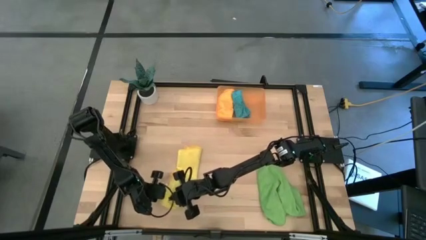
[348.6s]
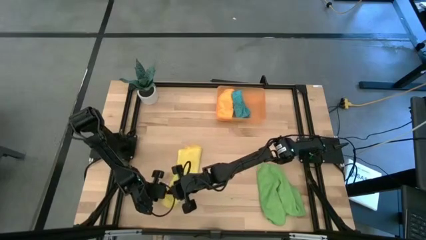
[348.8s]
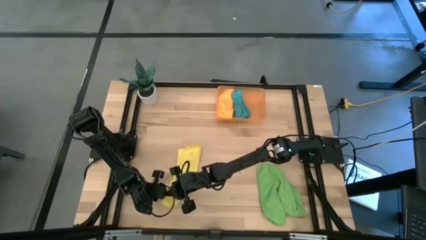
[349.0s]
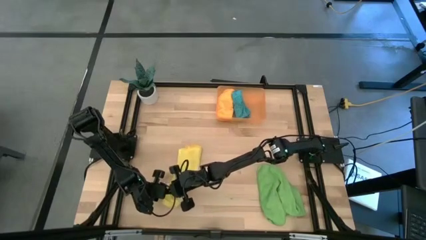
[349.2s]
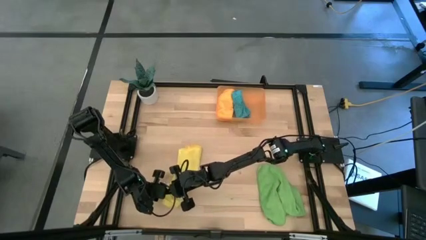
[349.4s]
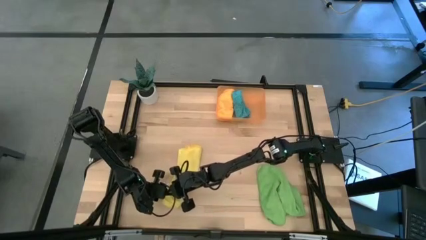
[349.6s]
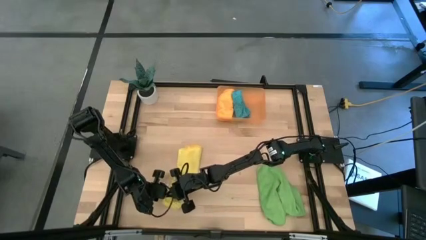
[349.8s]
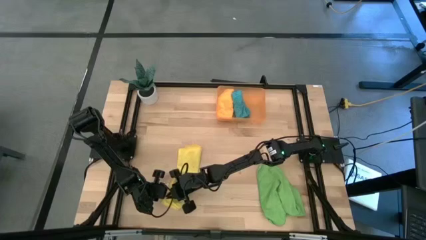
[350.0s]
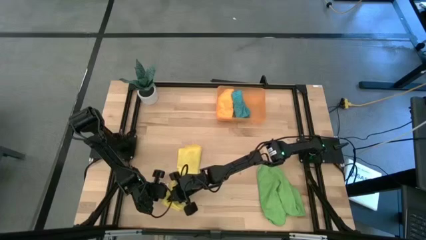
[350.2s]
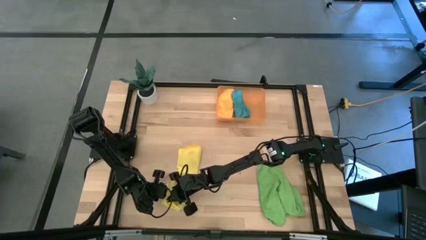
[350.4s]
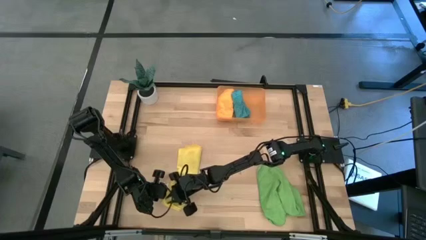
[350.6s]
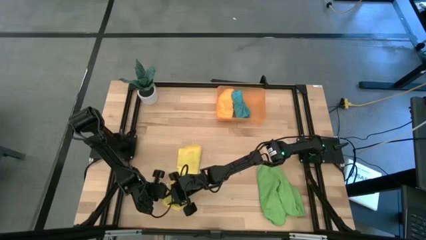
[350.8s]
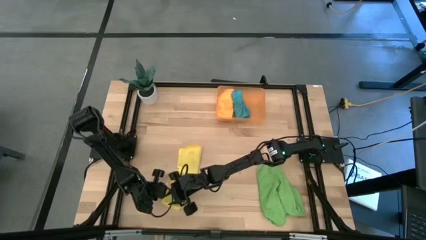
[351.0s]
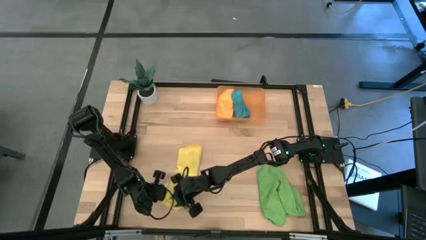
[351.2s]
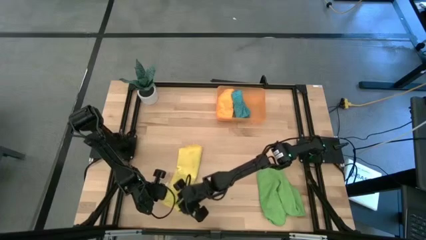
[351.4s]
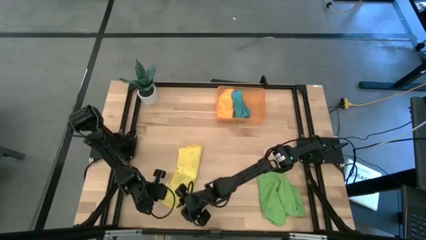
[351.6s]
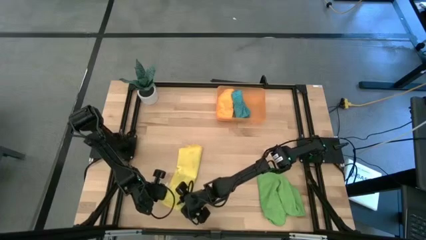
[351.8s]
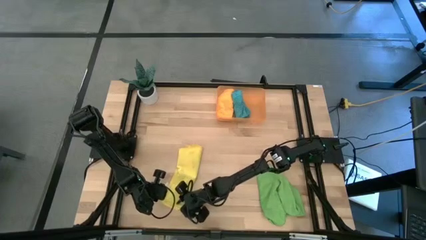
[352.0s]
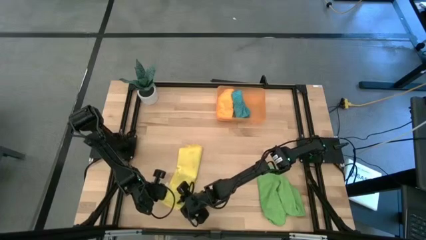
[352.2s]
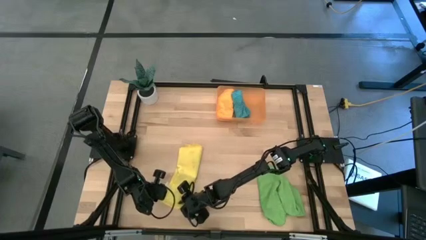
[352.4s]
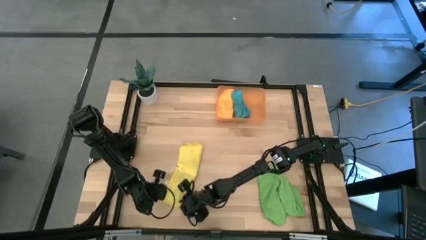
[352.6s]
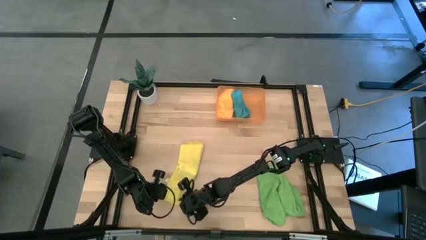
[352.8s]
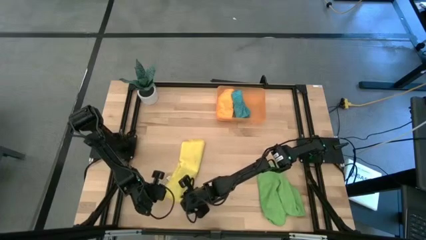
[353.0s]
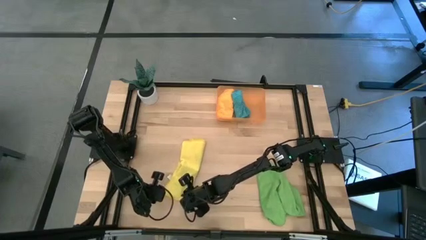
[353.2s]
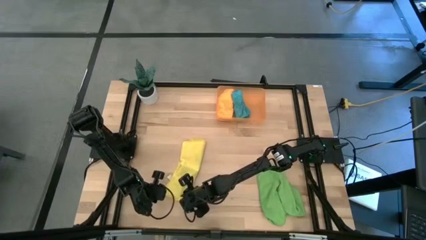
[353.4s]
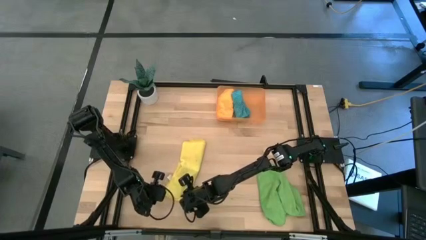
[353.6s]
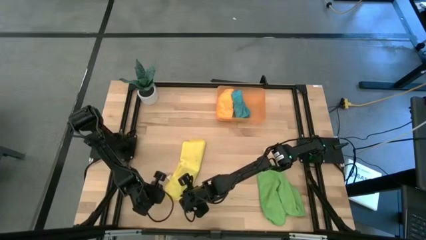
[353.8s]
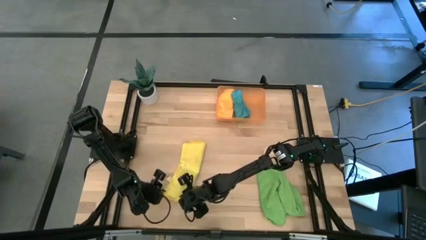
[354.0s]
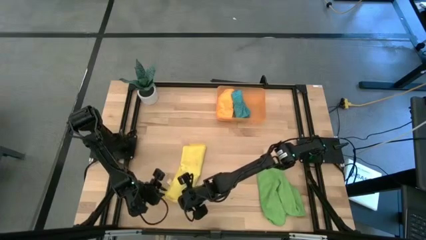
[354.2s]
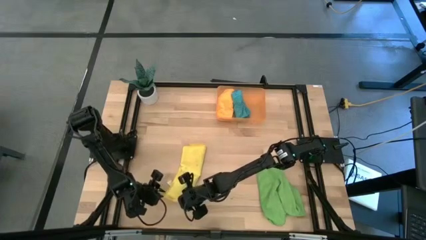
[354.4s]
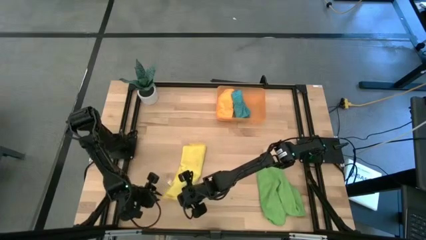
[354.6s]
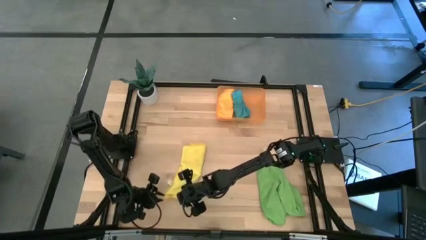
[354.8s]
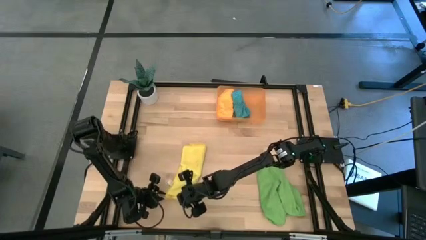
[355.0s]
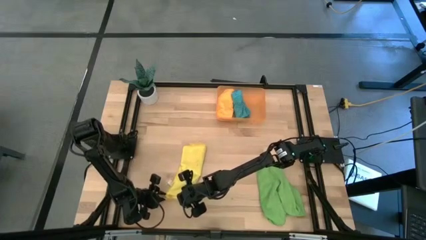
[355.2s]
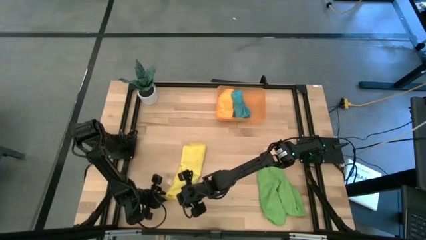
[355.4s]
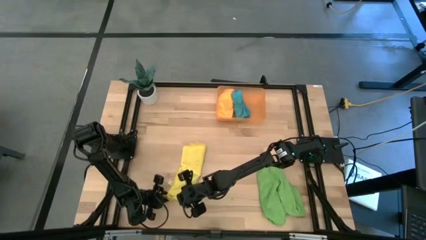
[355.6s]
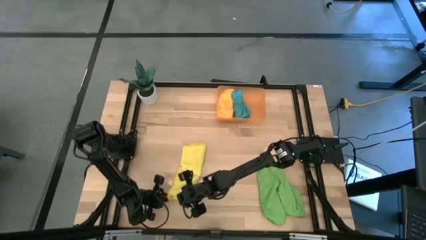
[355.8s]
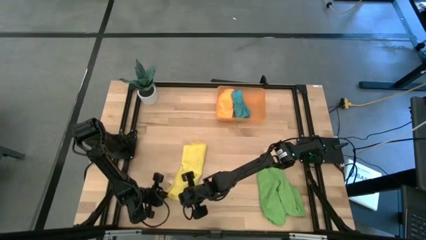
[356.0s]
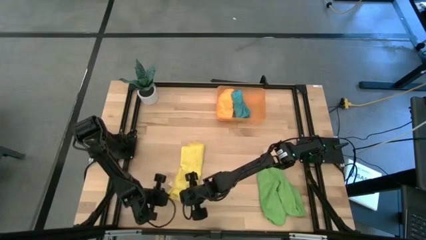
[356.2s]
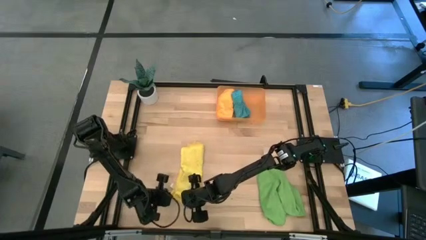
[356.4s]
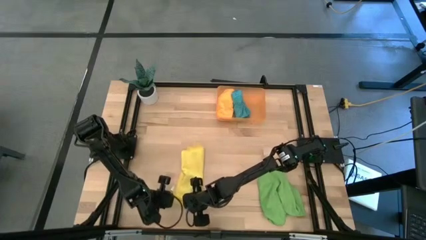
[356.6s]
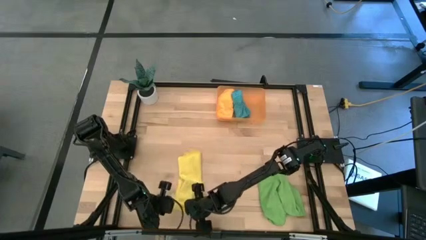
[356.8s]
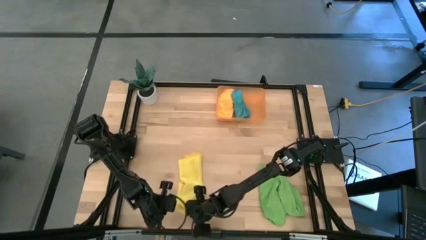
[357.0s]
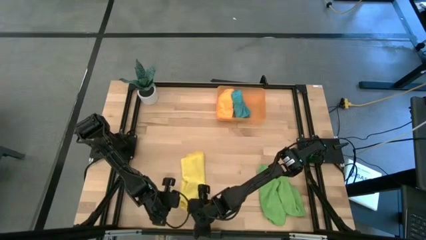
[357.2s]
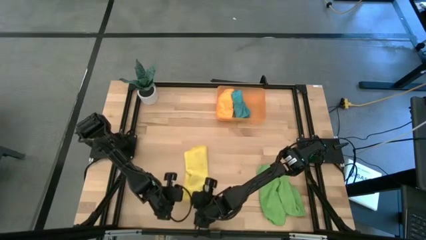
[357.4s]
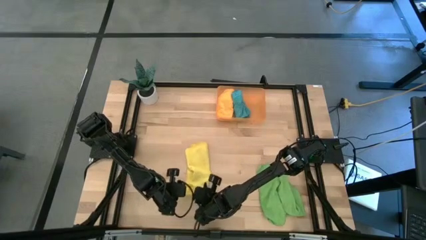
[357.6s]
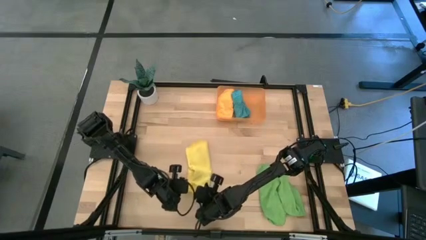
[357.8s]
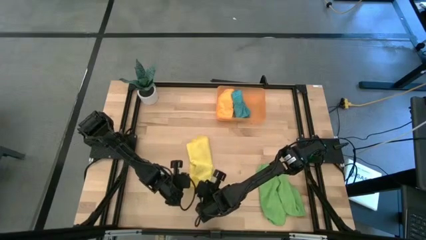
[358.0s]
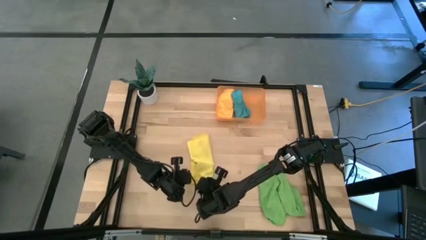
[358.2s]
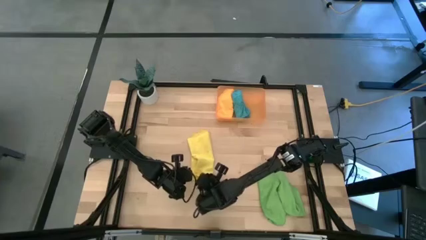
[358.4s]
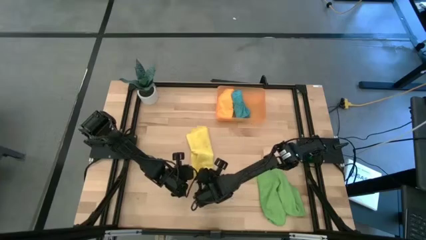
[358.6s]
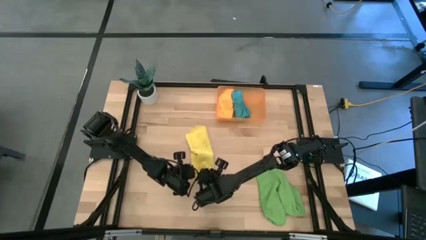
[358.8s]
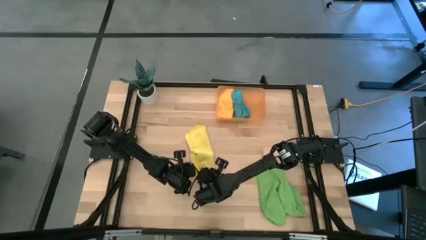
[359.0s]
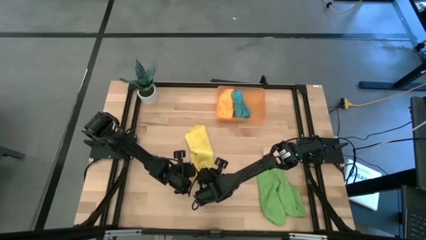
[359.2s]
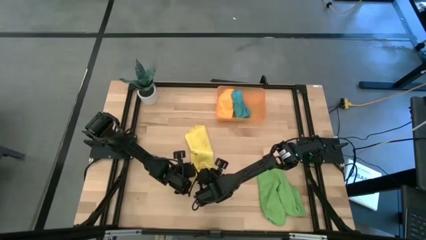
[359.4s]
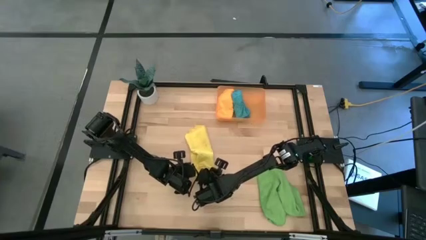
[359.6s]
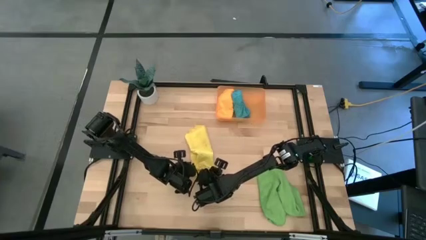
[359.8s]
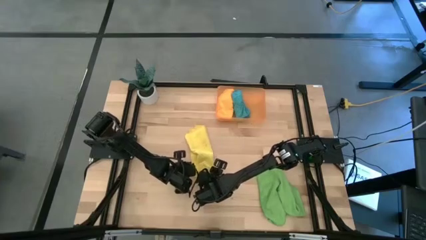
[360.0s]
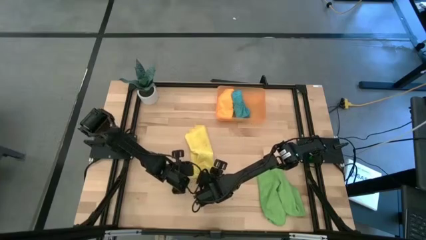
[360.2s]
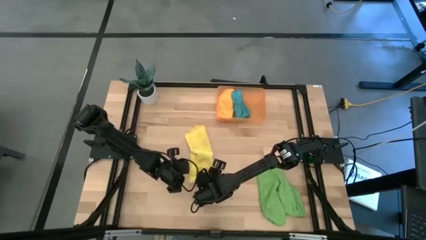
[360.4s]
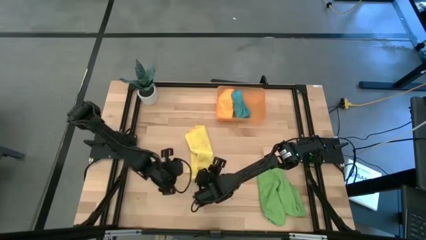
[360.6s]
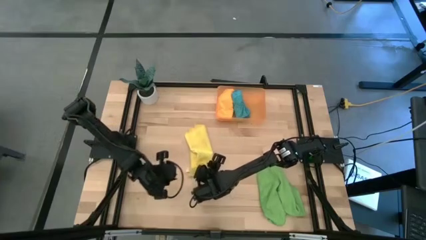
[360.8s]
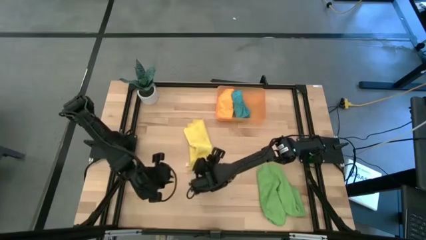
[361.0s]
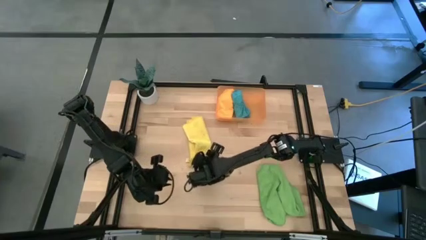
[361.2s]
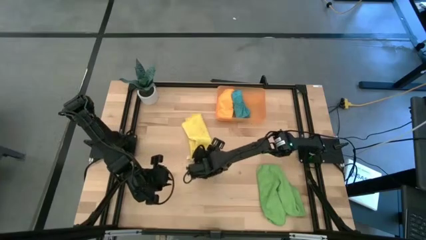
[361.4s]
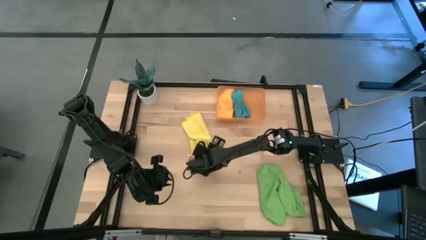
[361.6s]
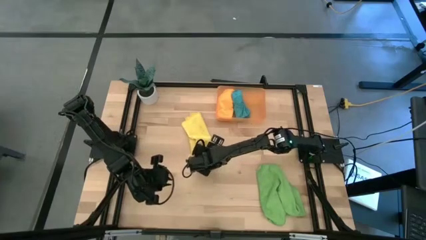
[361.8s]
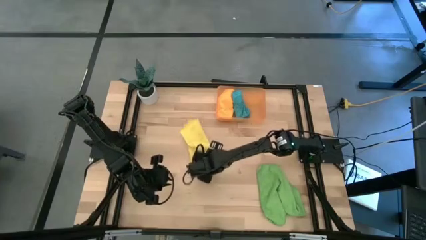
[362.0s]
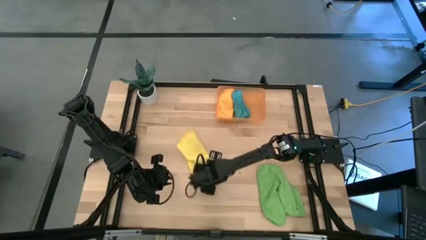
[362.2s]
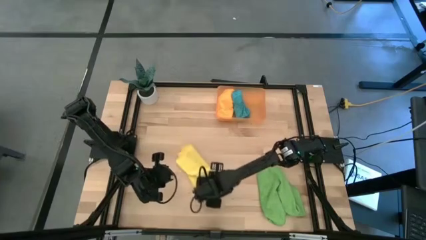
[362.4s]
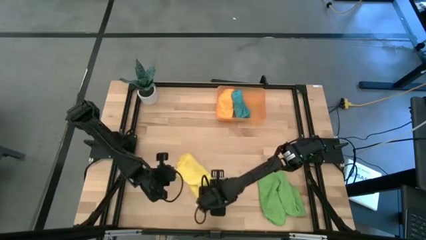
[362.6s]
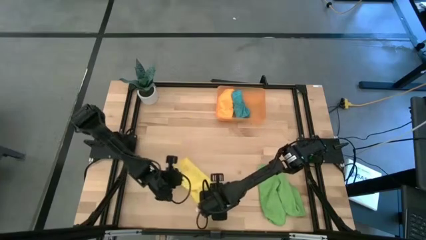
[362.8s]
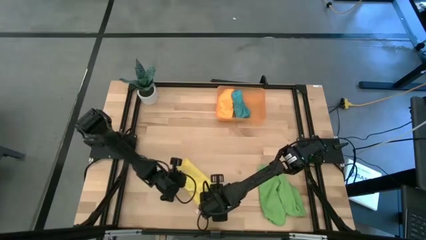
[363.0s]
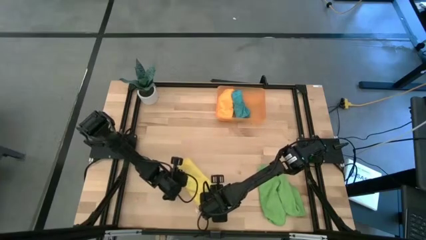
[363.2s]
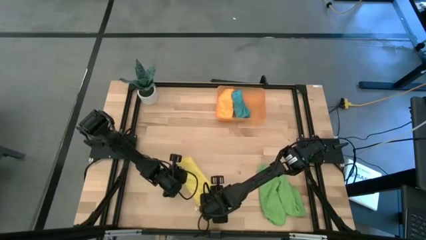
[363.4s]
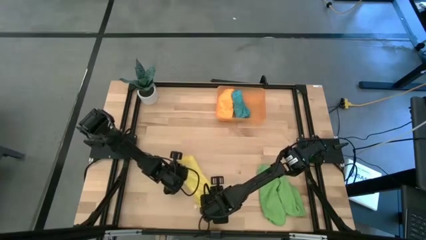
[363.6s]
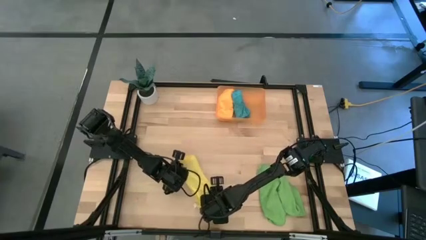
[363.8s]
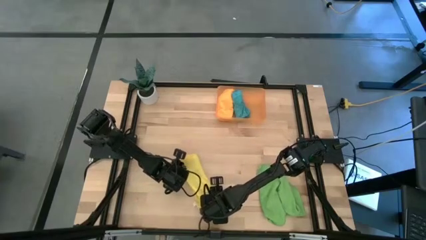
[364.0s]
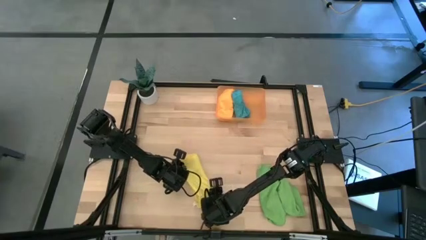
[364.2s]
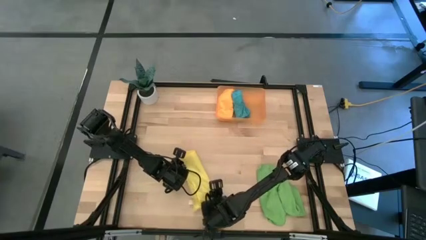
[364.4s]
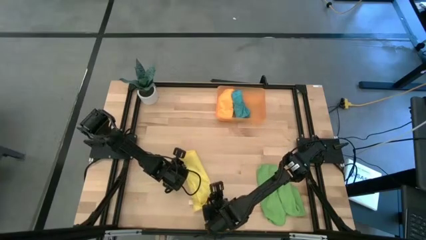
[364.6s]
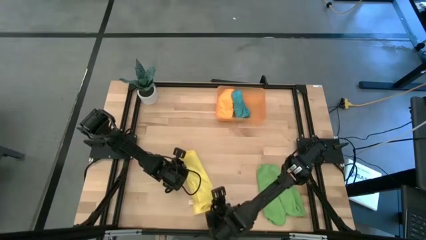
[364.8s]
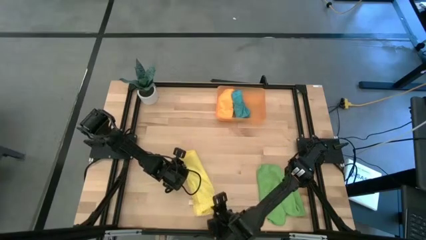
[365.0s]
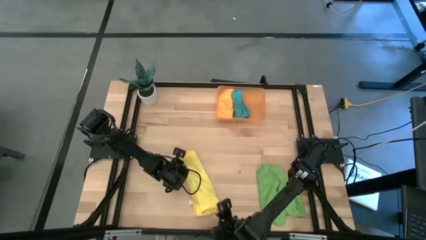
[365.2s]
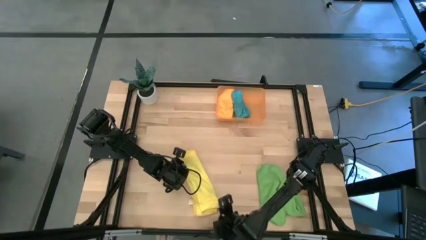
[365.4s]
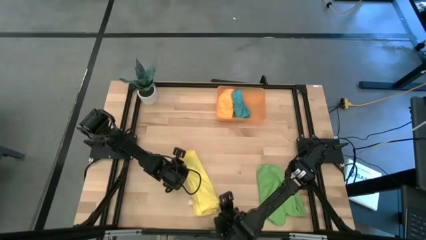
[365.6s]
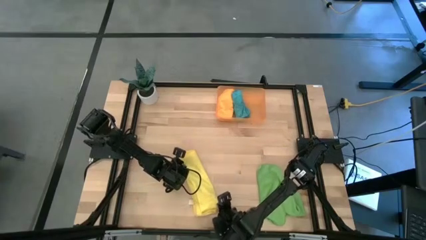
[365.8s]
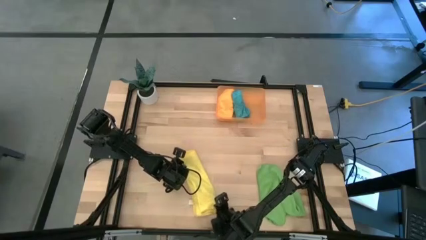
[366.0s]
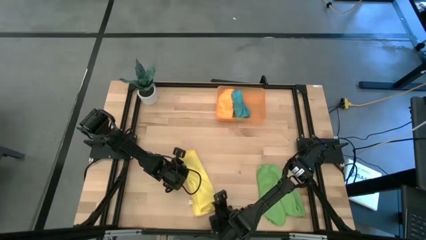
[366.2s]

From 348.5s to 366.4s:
Task: Roll microfiber towels into tight, uniform cylinder then place into a basket
Roll the yellow microfiber towel
